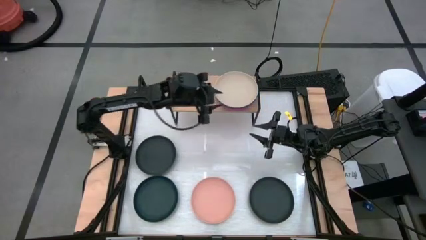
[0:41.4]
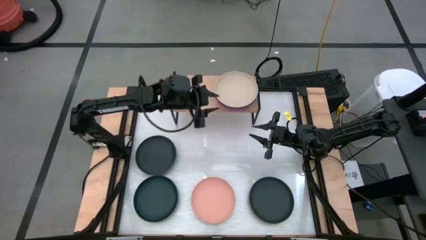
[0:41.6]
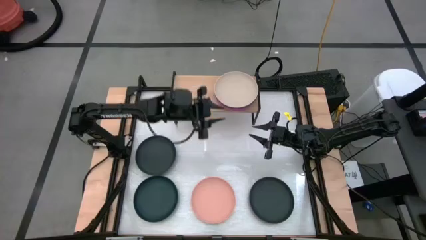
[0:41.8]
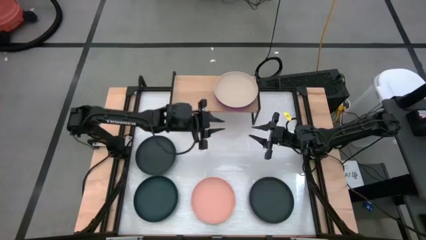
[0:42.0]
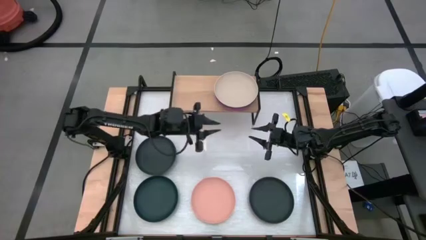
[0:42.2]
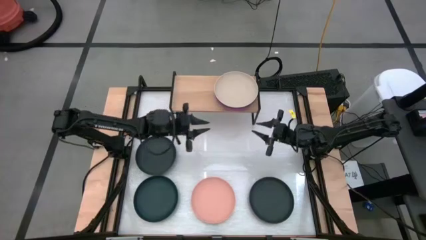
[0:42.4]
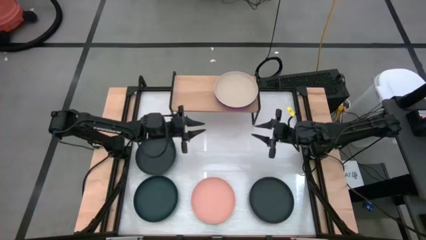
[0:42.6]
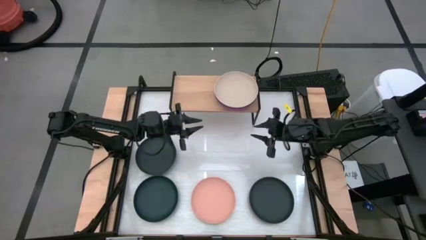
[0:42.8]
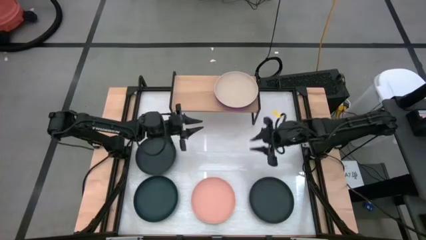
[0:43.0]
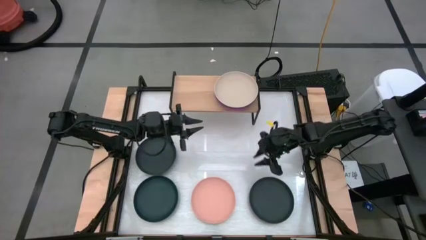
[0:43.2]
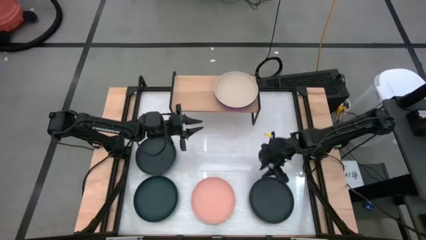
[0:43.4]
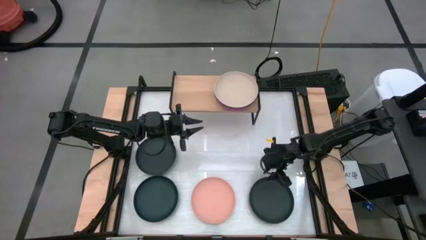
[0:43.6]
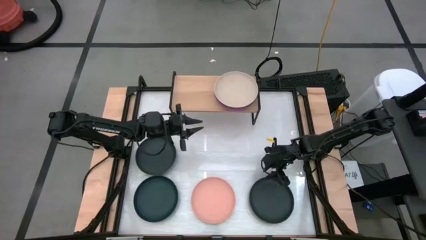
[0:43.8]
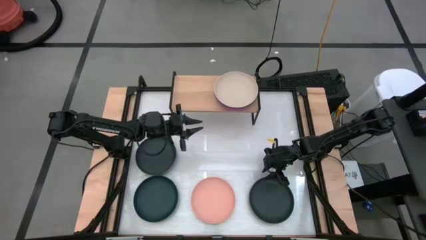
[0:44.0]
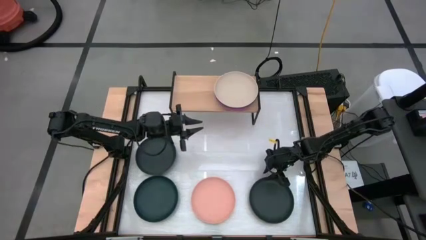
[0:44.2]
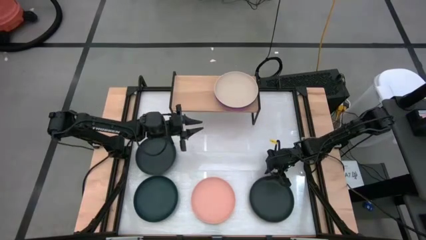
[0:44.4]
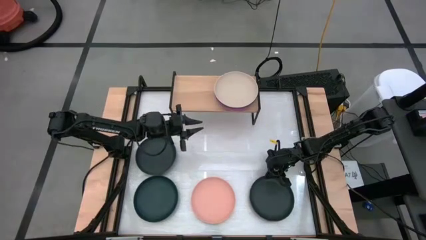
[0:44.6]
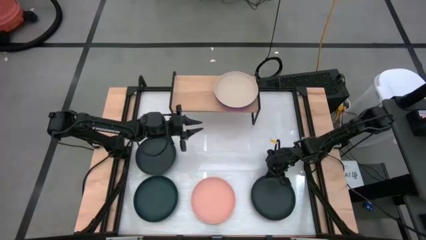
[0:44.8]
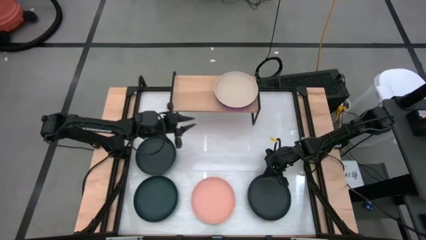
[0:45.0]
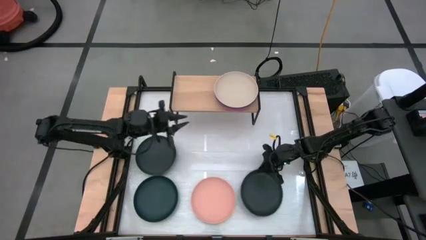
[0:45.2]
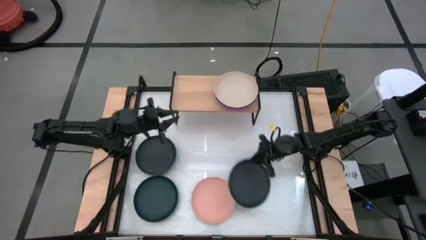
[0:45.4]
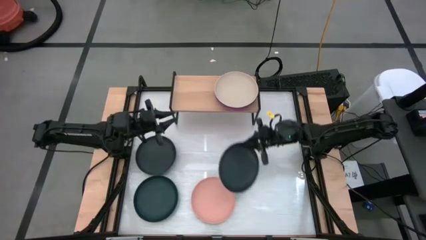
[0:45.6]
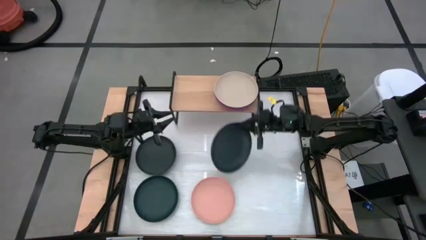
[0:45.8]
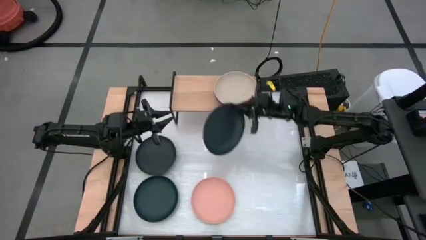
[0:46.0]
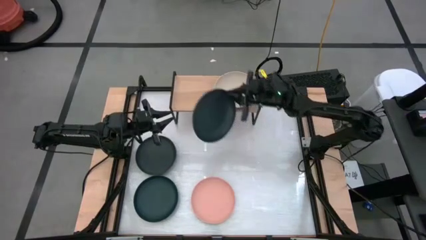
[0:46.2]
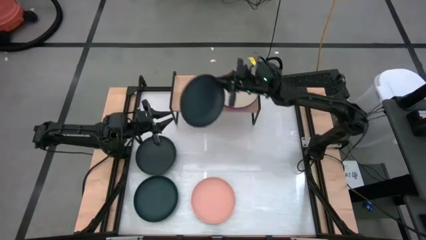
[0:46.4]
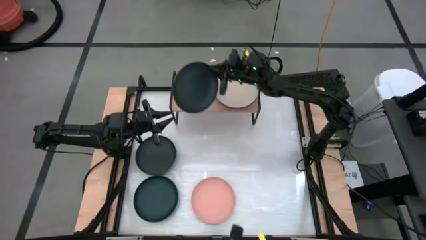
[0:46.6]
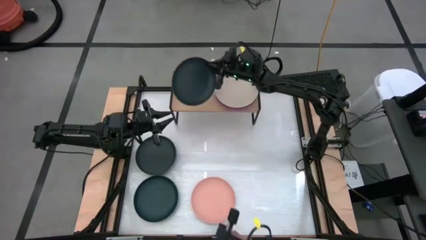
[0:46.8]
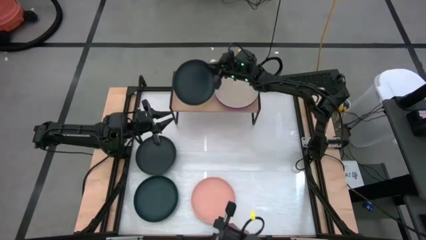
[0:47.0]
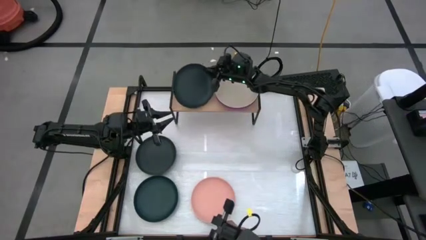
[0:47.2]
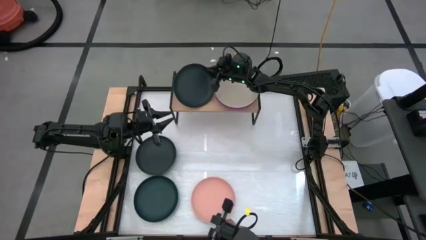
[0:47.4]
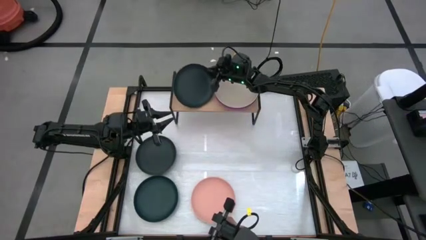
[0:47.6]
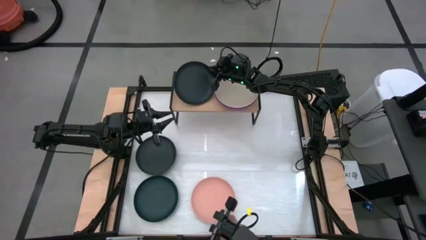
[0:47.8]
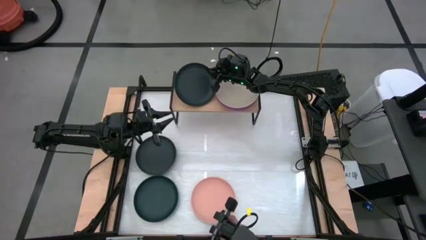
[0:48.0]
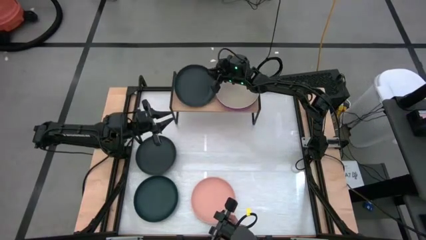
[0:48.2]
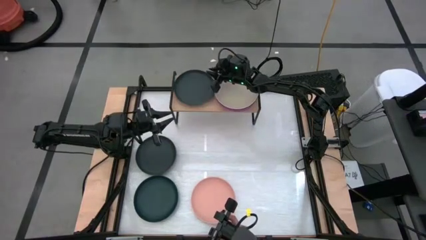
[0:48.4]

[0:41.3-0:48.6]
Task: Place and stack plates onto a shelf
Put the bottom black plate on the shelf

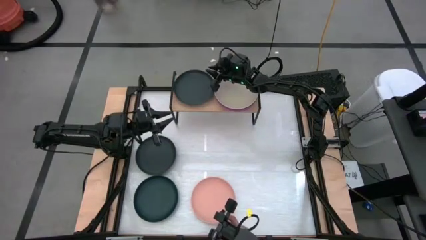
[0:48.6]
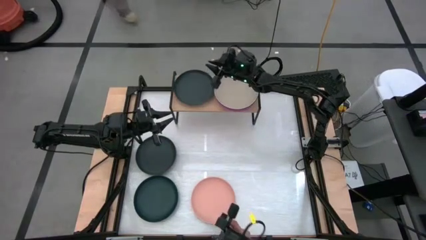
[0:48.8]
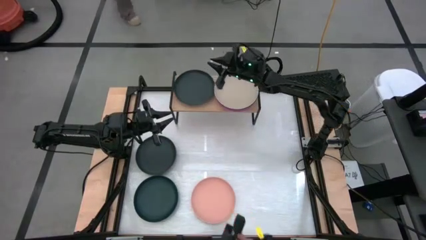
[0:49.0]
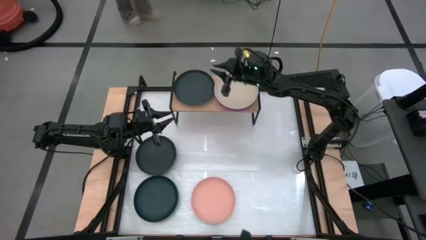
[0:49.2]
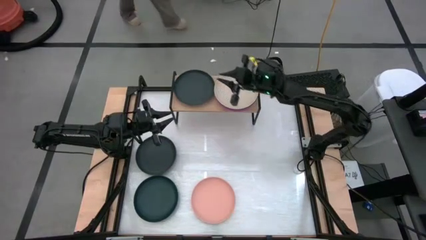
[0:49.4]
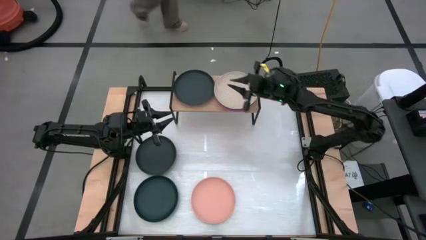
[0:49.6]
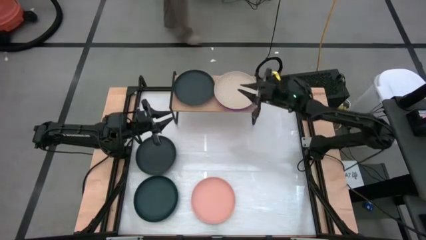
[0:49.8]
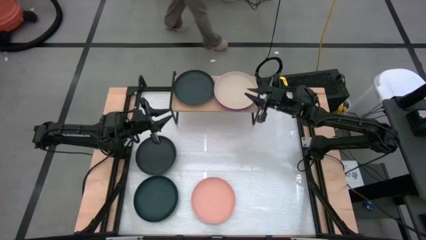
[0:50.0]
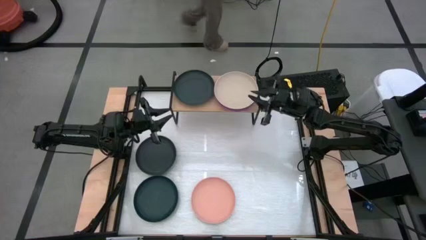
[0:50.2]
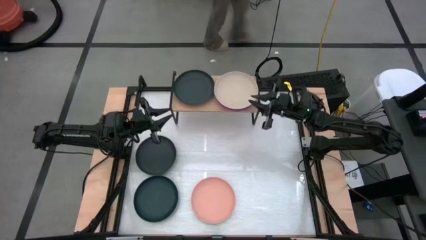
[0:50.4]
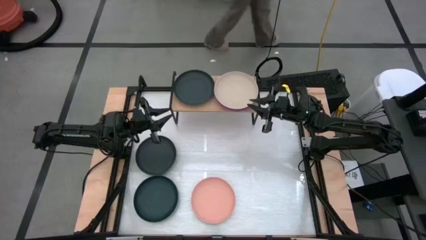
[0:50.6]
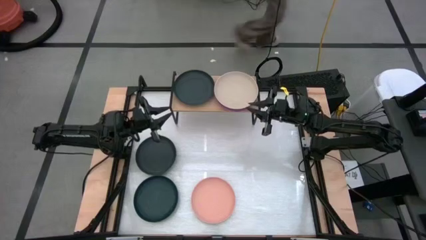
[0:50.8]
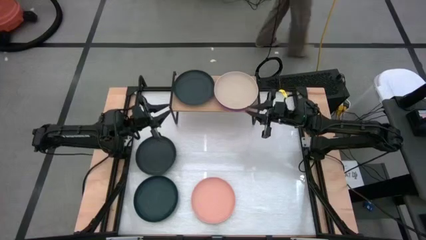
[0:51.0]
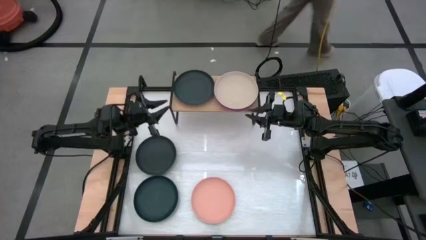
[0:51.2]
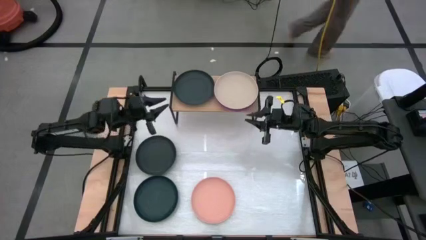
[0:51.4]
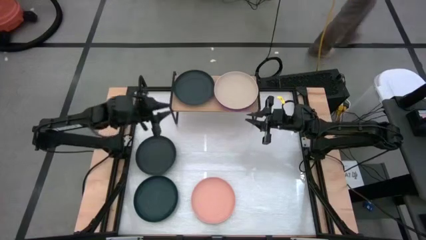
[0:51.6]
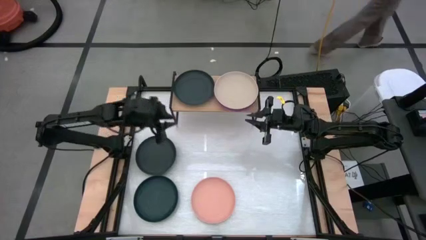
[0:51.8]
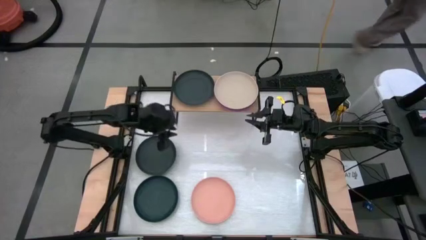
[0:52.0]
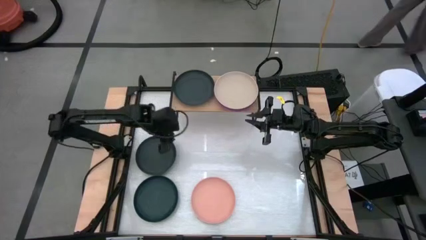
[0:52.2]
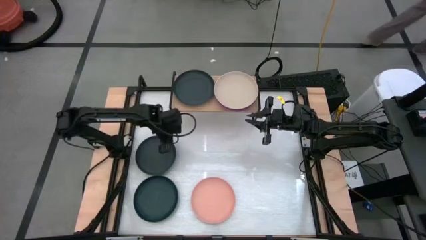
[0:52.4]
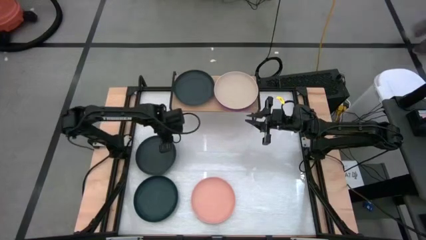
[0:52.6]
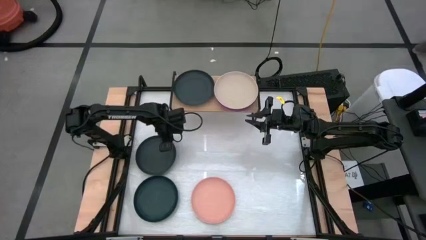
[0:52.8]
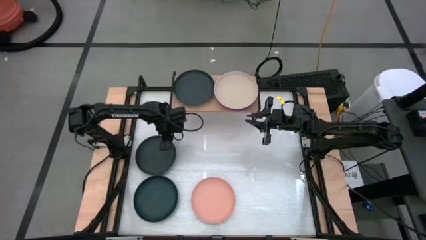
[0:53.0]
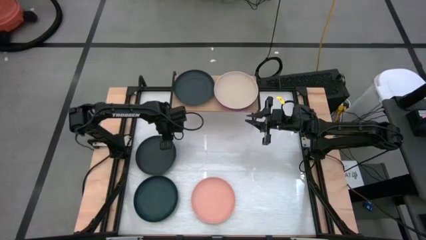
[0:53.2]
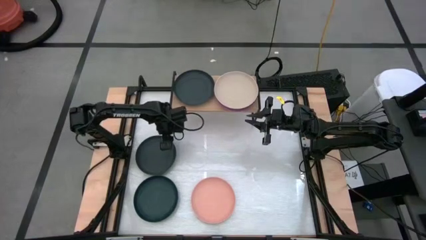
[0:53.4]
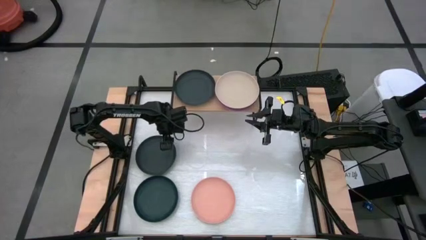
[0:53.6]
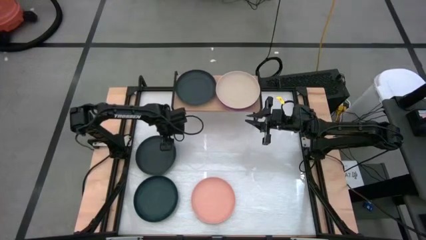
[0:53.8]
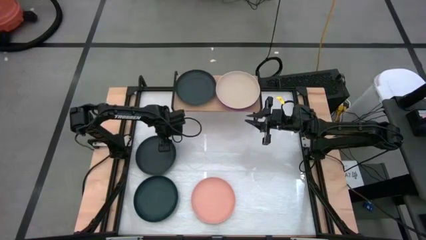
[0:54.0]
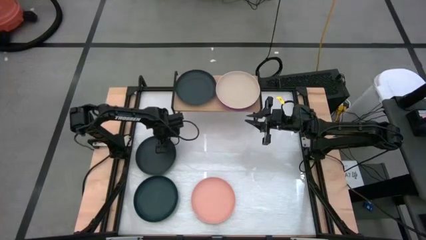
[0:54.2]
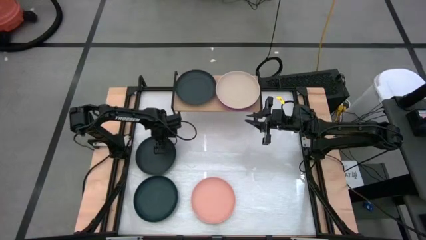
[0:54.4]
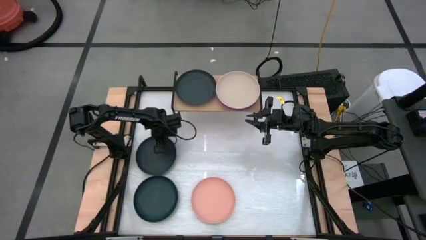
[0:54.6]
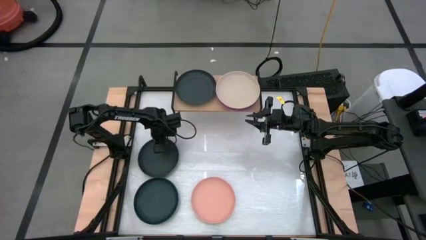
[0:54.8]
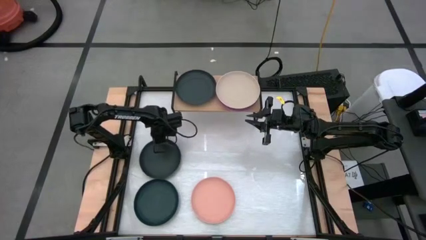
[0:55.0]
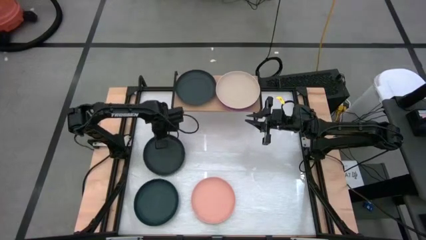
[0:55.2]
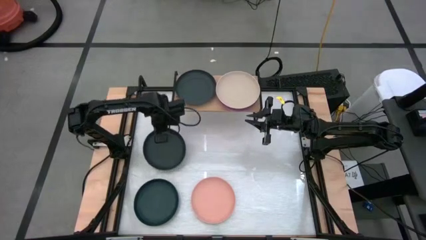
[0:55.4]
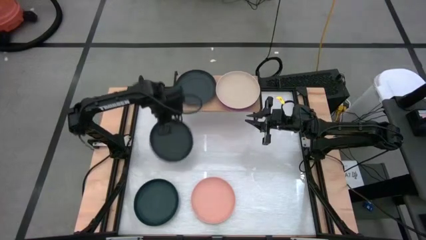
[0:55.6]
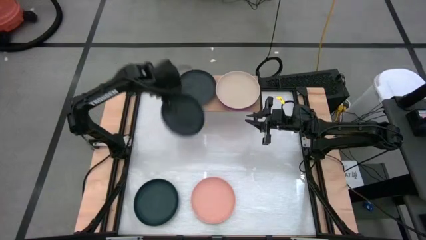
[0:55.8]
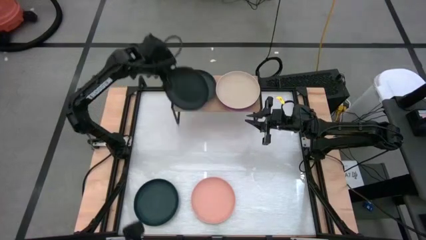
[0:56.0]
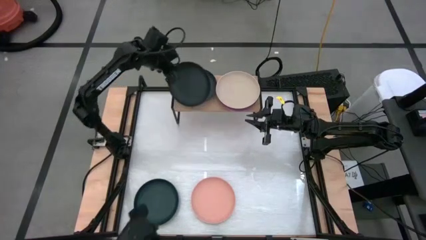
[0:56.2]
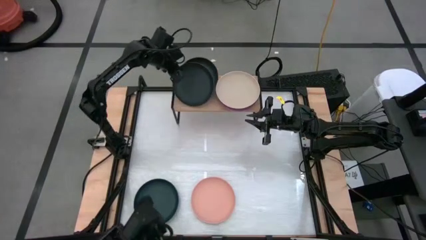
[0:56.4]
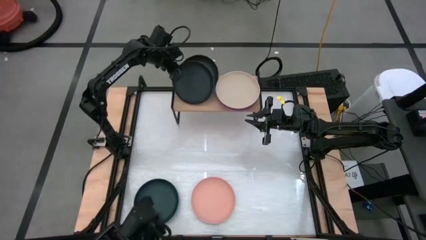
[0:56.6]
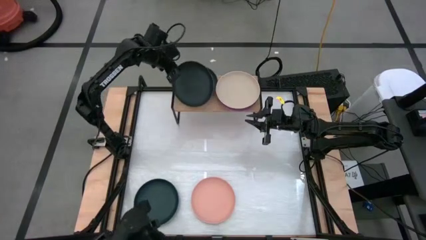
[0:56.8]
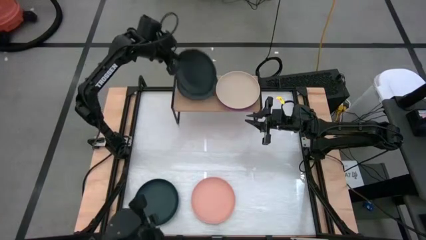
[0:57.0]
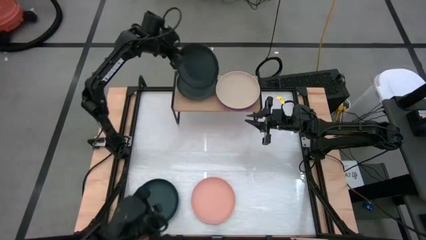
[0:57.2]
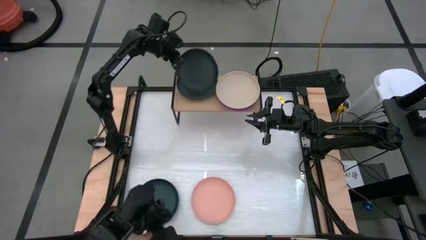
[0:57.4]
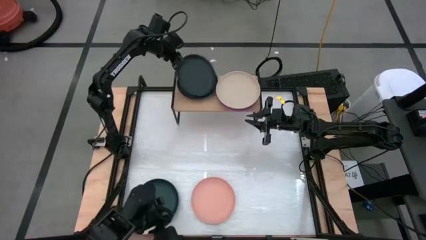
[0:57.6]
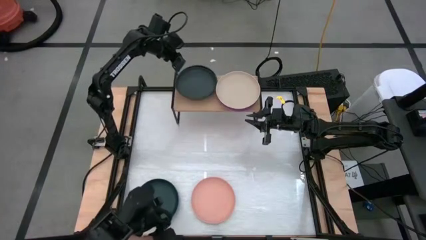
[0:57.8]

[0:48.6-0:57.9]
Stack the black plate on top of the black plate on the shelf
